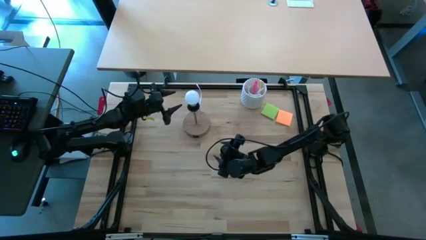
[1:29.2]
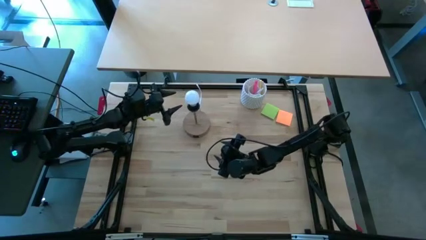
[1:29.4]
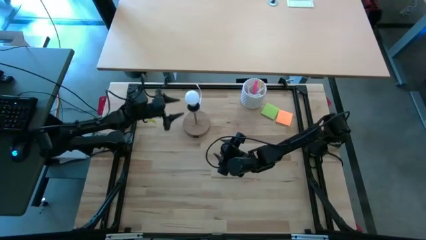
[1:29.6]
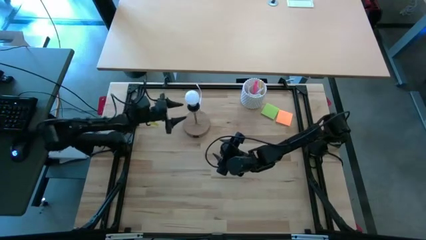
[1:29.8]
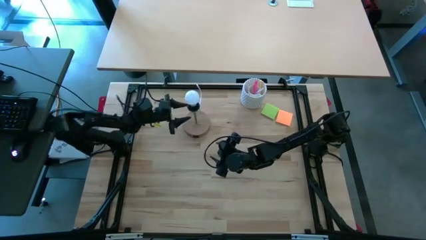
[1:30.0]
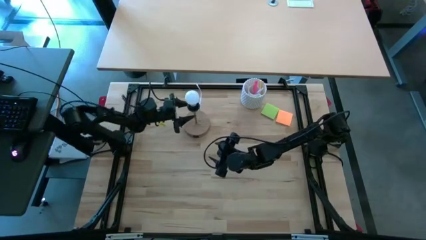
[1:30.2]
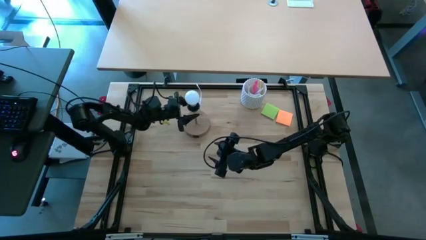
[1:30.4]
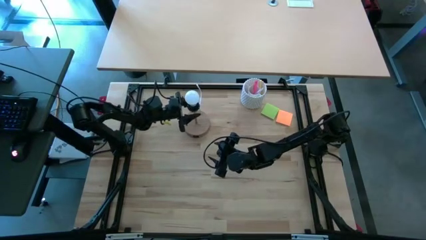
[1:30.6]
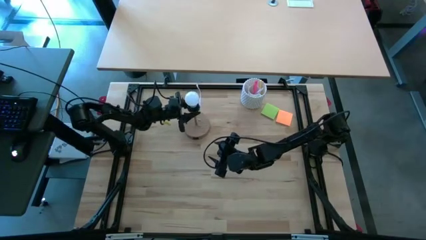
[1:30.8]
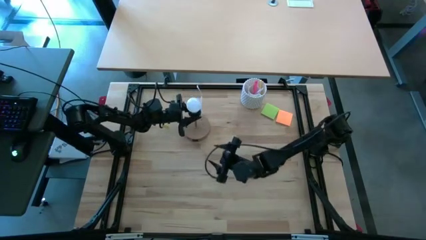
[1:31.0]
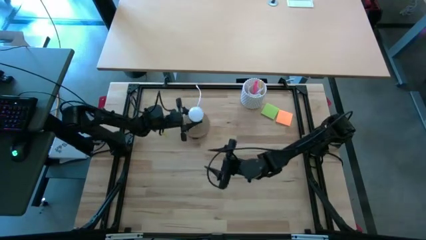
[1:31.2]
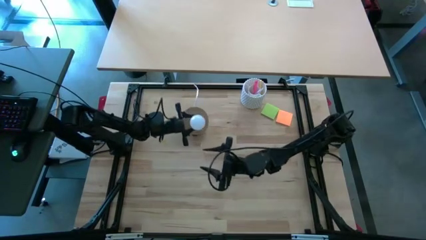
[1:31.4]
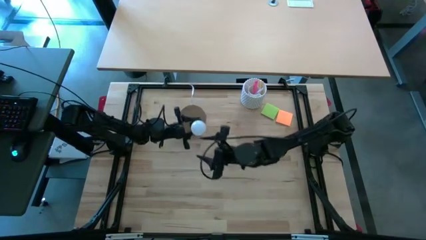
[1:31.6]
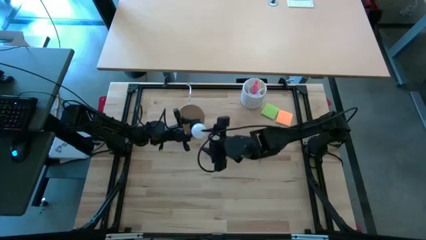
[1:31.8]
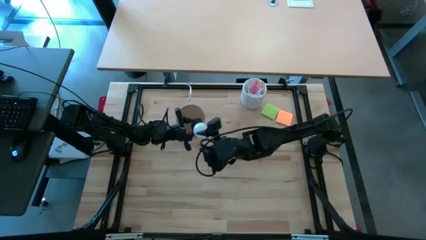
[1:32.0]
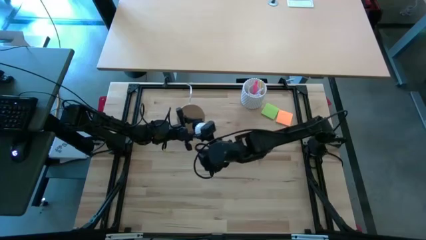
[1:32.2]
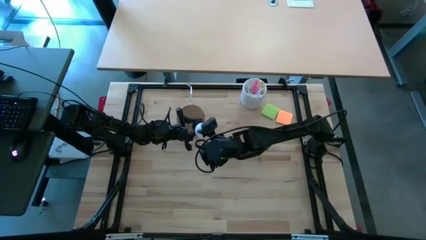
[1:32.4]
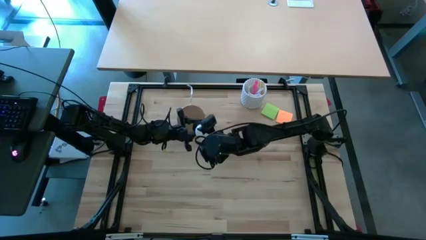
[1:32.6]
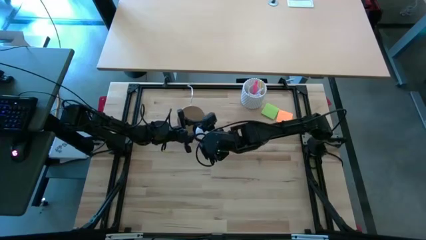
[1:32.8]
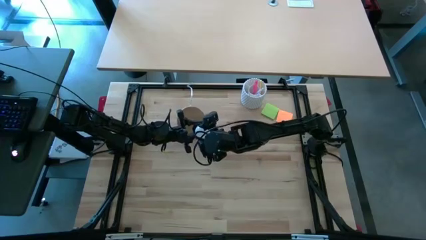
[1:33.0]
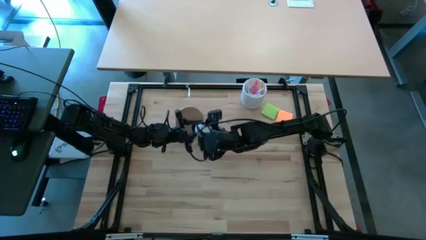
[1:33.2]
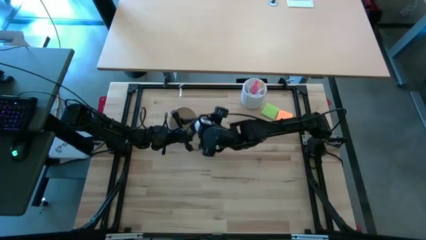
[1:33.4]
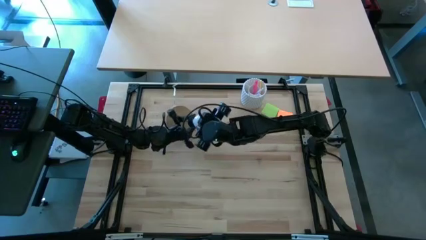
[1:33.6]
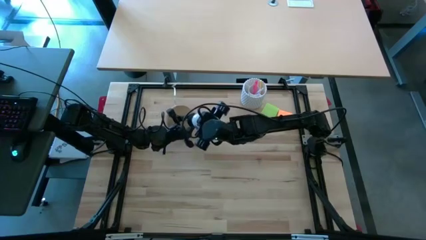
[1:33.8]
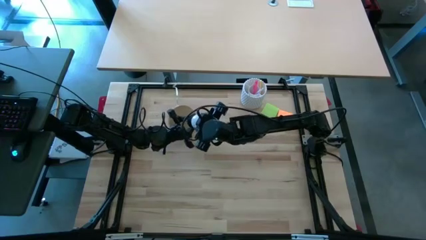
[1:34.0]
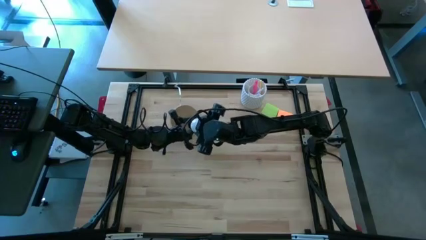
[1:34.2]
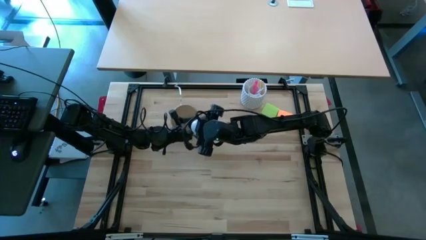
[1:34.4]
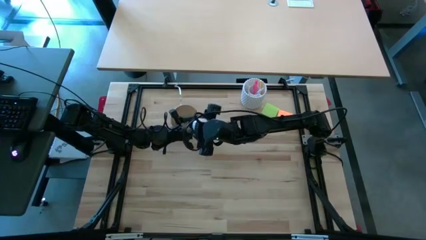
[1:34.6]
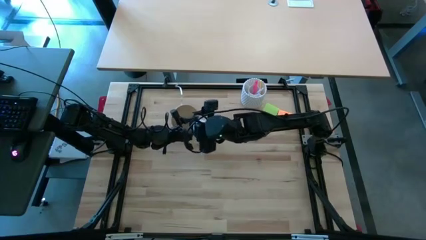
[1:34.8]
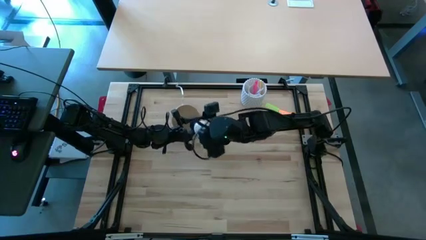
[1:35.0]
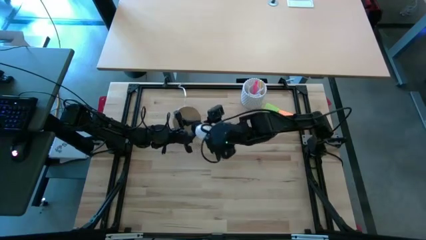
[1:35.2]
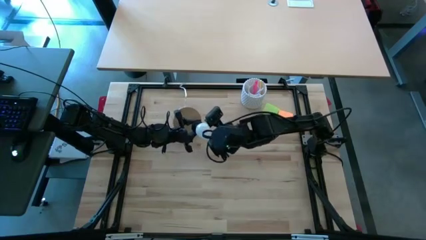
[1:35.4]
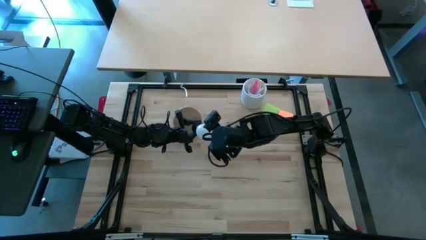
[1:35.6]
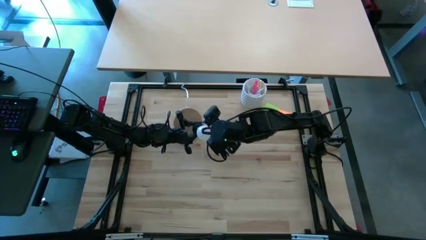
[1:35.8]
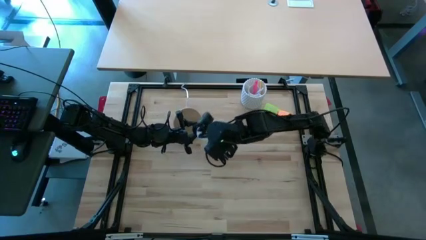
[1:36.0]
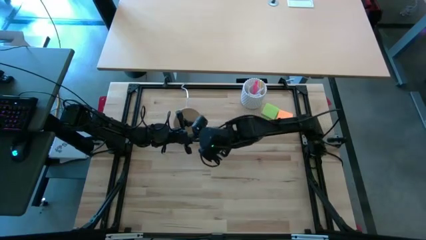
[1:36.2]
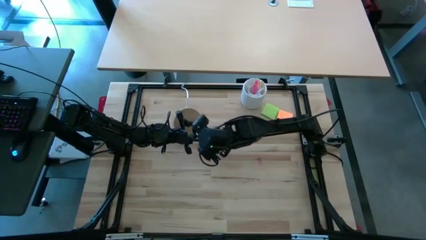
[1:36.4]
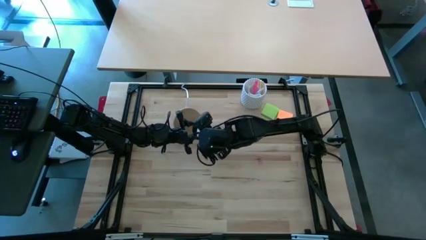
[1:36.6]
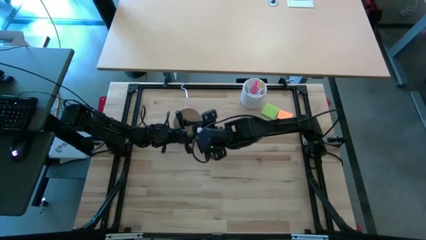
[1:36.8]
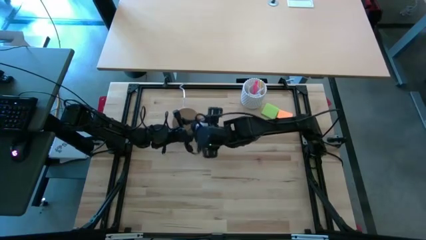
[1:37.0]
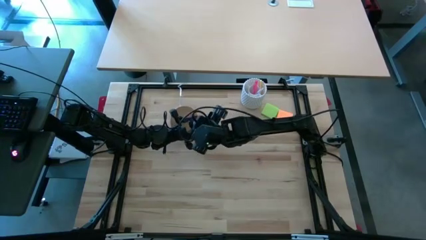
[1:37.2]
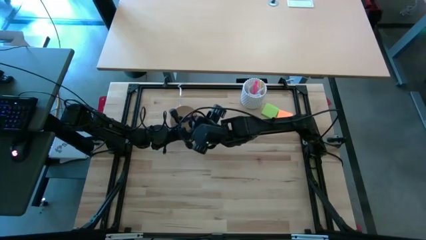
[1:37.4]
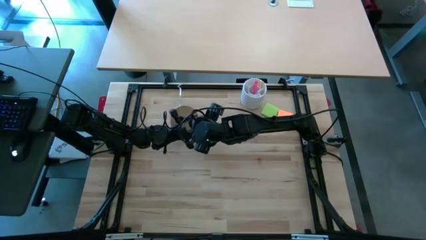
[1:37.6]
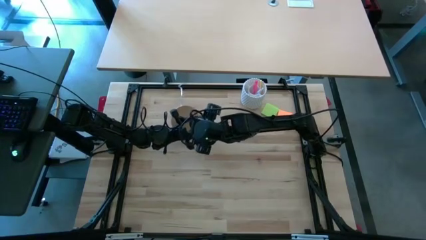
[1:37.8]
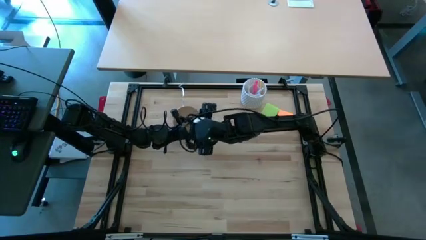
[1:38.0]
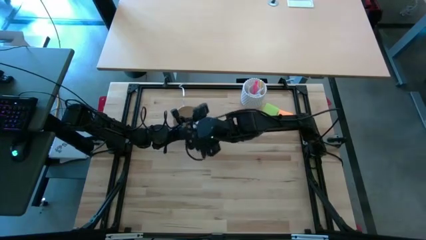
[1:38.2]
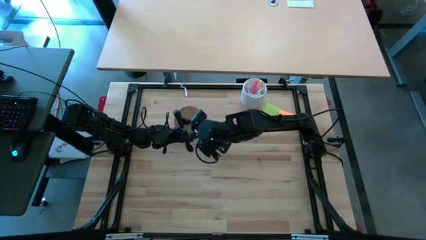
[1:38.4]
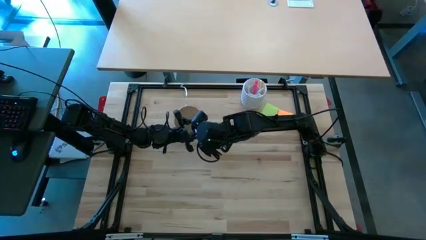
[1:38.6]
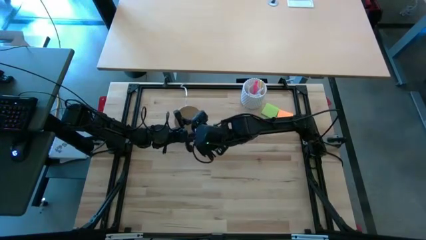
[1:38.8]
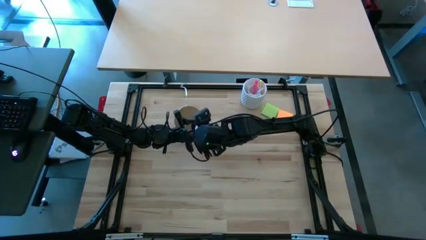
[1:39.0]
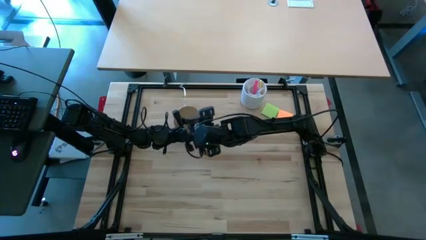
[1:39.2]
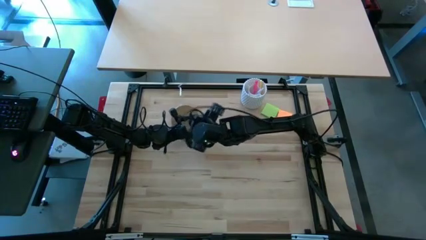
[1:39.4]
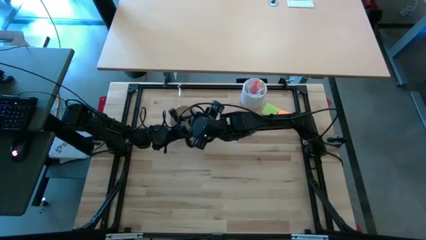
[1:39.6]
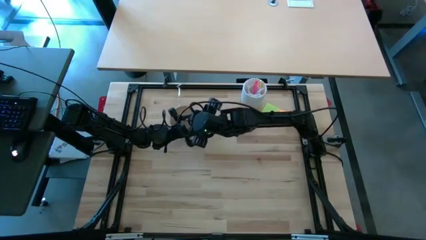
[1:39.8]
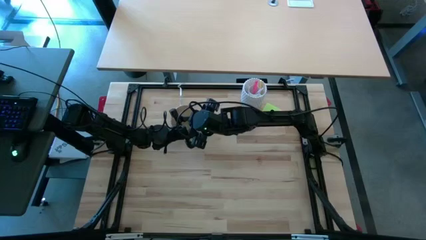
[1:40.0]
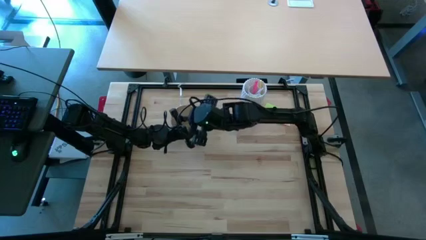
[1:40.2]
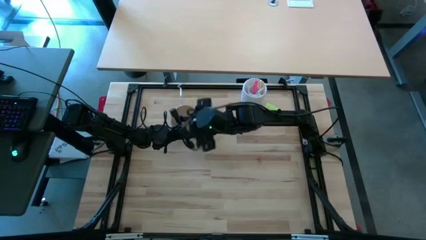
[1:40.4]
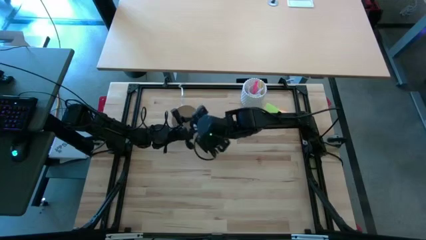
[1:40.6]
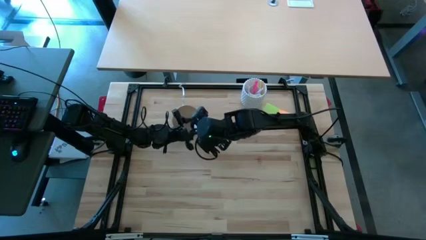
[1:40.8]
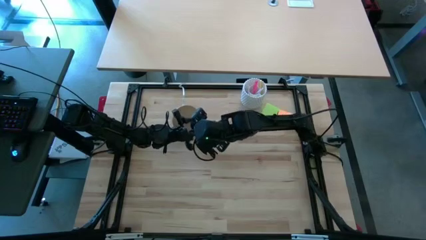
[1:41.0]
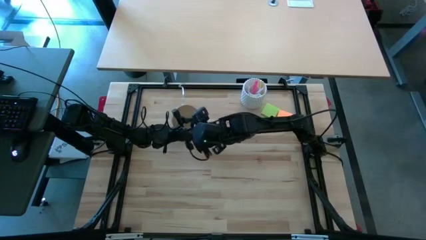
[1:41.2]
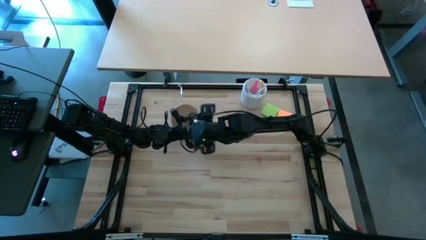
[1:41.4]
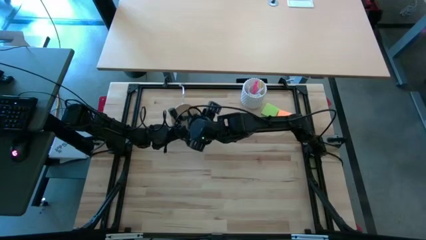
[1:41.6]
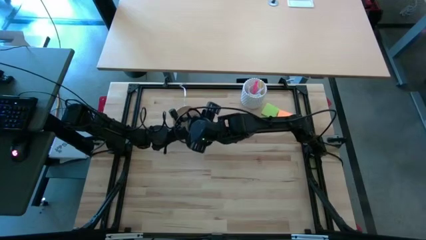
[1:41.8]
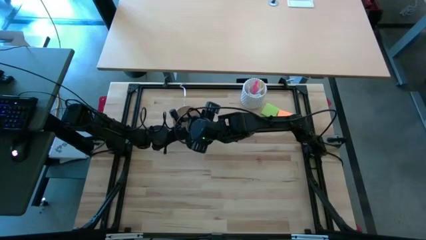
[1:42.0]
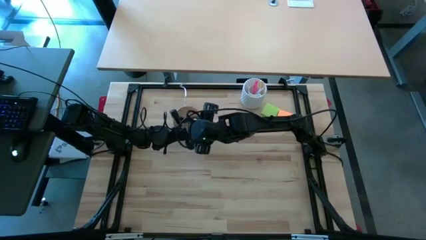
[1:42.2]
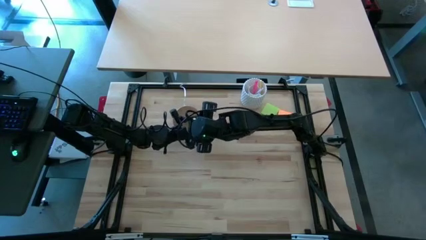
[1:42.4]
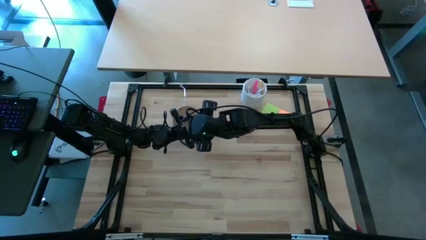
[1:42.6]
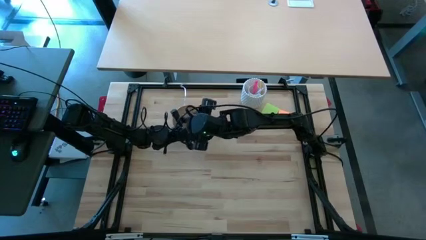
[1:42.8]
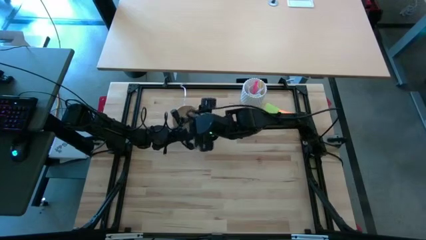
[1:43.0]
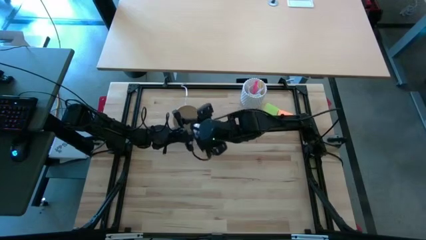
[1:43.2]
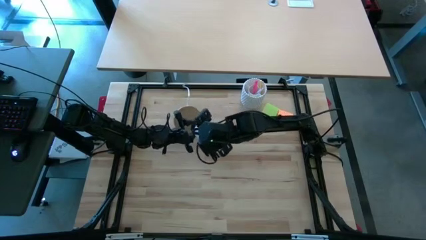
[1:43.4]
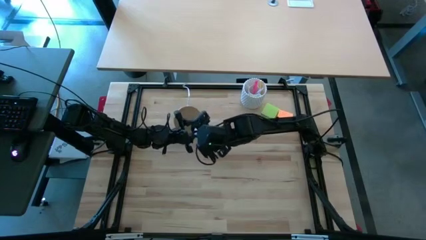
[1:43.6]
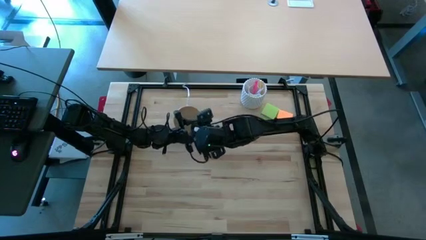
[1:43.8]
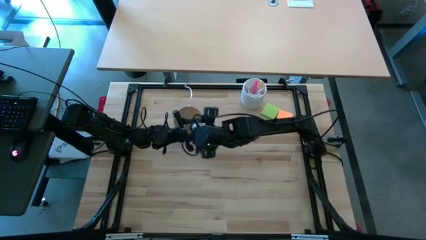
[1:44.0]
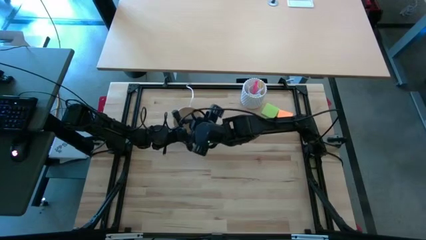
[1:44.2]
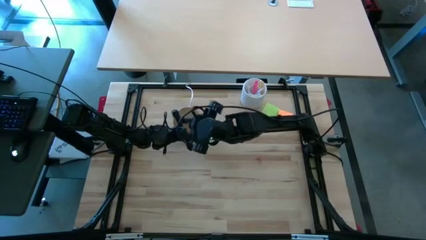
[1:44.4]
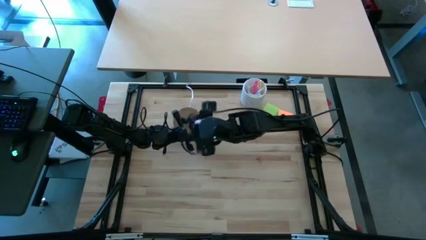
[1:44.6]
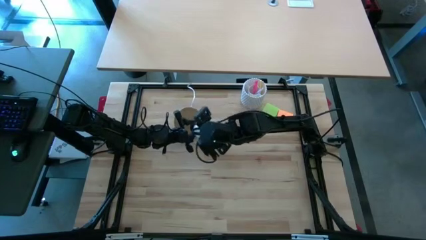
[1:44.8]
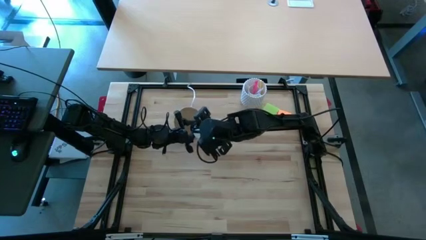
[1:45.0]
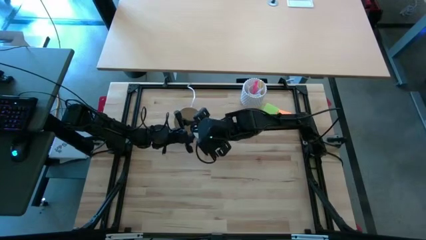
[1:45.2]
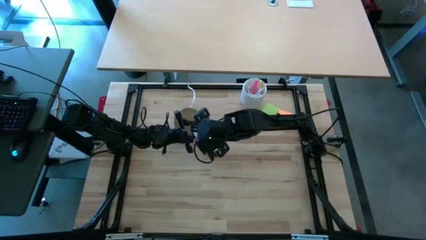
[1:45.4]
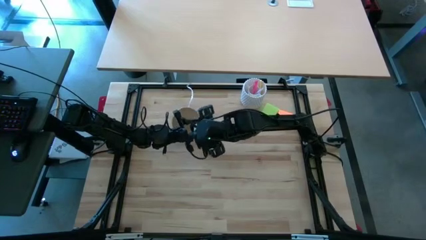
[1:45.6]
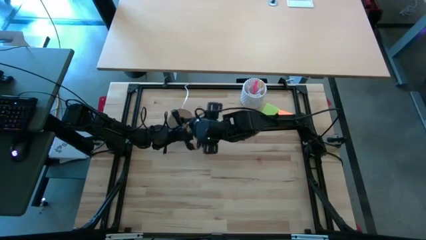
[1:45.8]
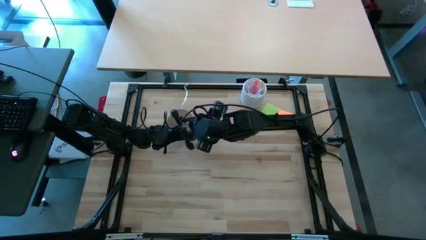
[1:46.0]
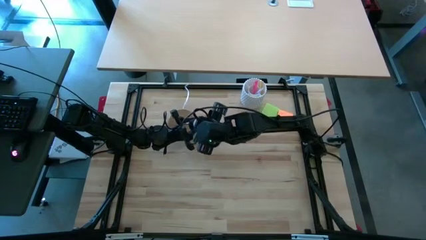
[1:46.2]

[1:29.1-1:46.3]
Task: Screw lightbulb
Insert the white lightbulb into the desk lamp
